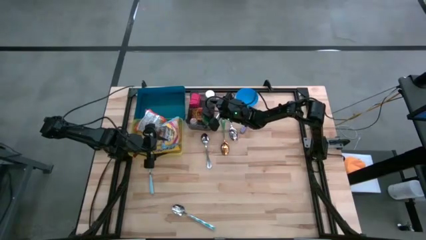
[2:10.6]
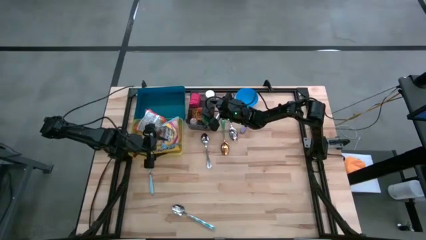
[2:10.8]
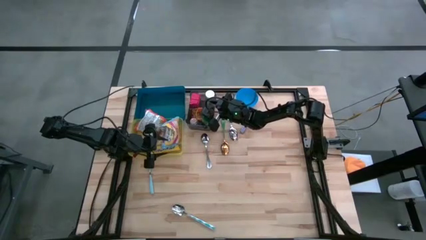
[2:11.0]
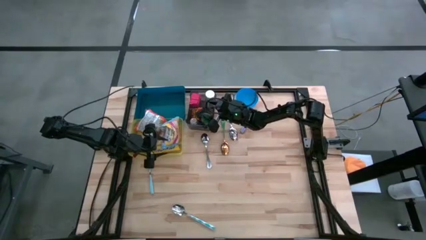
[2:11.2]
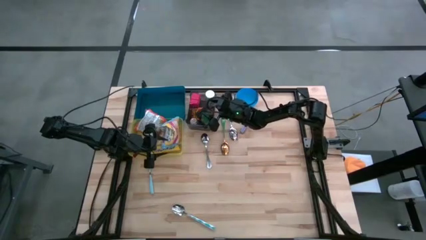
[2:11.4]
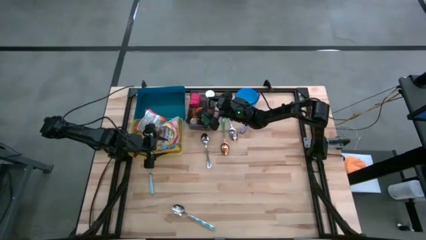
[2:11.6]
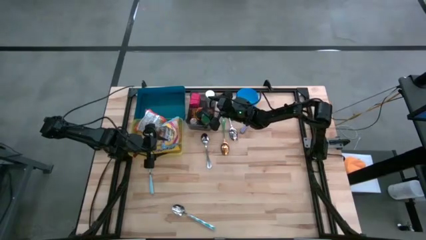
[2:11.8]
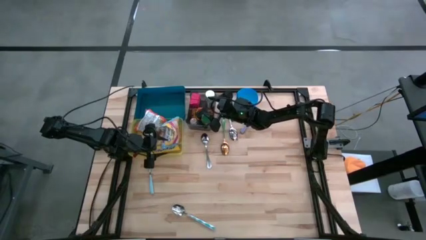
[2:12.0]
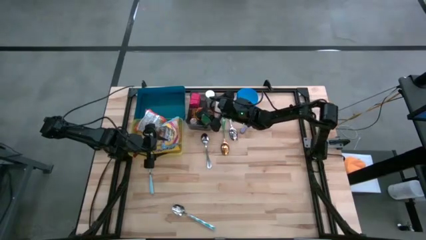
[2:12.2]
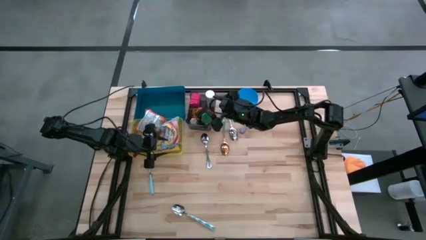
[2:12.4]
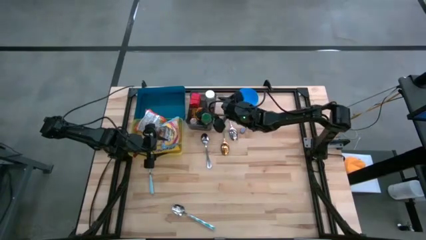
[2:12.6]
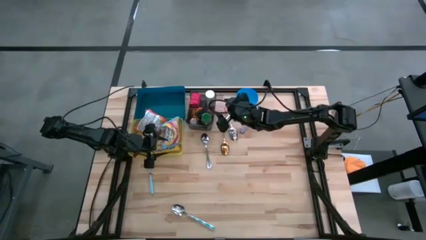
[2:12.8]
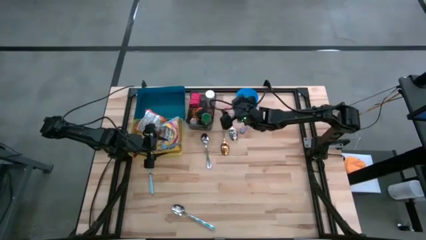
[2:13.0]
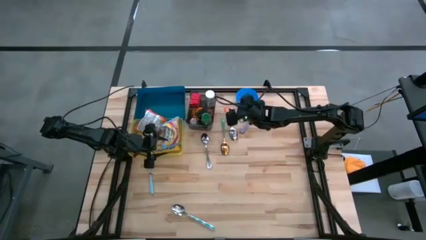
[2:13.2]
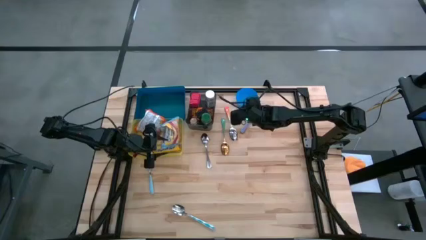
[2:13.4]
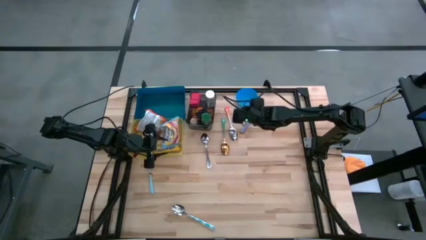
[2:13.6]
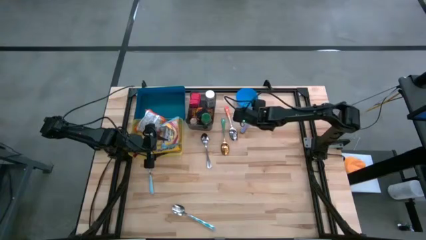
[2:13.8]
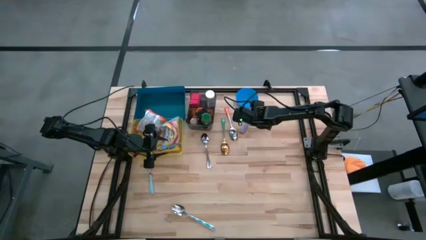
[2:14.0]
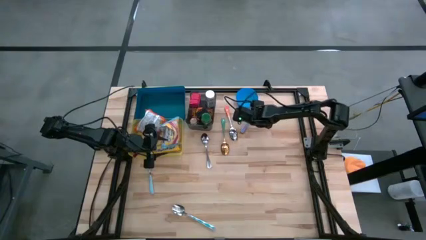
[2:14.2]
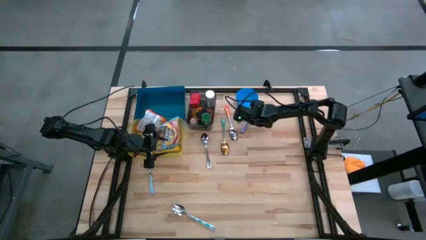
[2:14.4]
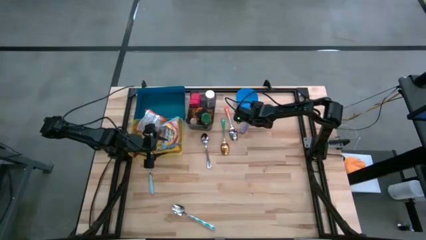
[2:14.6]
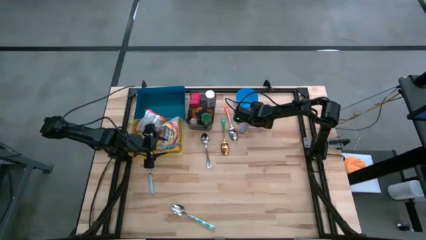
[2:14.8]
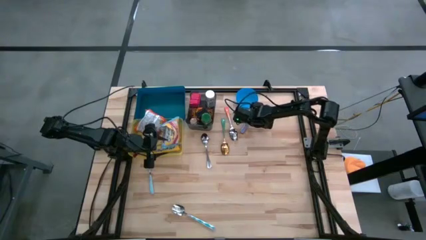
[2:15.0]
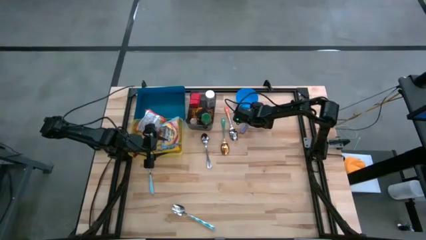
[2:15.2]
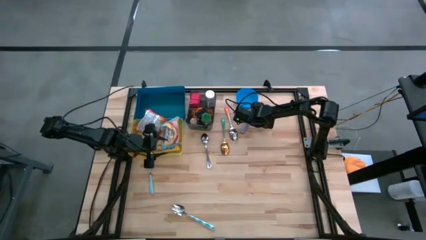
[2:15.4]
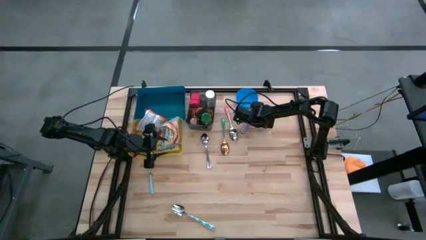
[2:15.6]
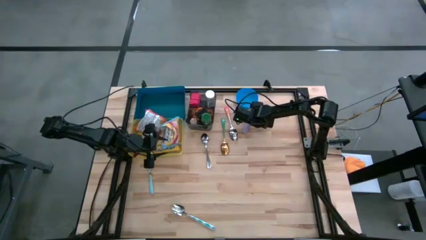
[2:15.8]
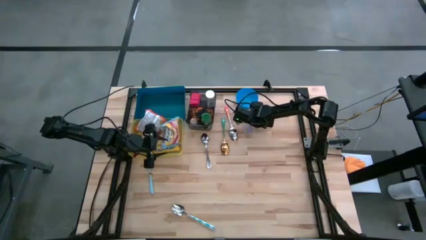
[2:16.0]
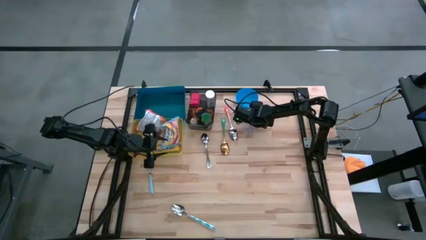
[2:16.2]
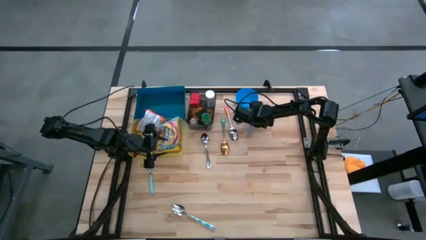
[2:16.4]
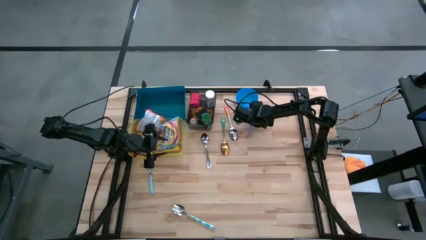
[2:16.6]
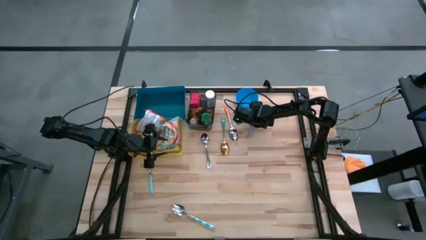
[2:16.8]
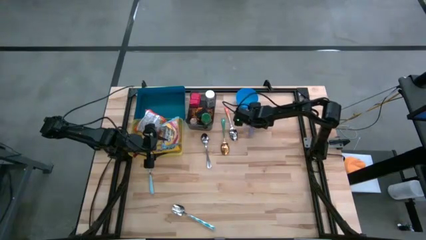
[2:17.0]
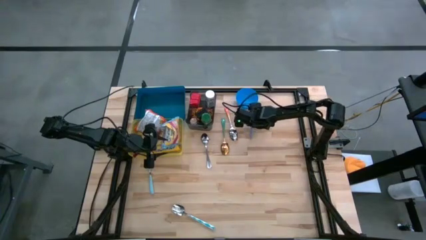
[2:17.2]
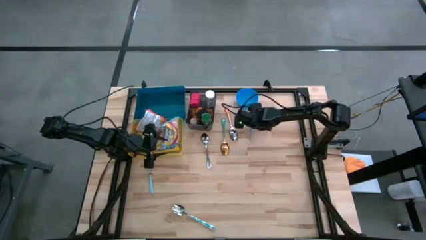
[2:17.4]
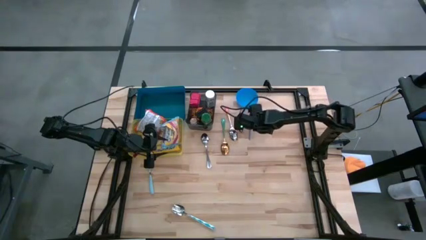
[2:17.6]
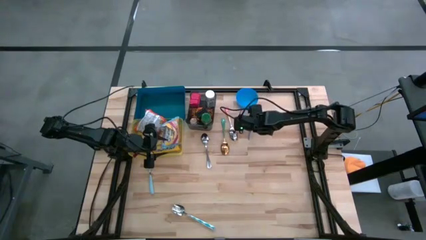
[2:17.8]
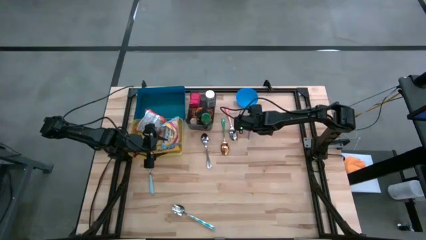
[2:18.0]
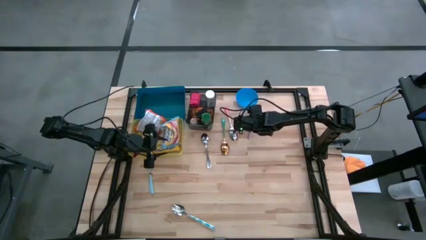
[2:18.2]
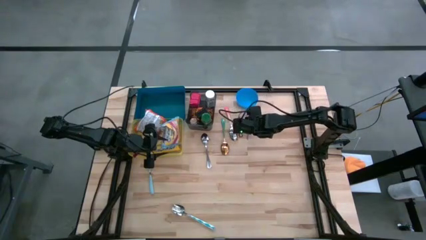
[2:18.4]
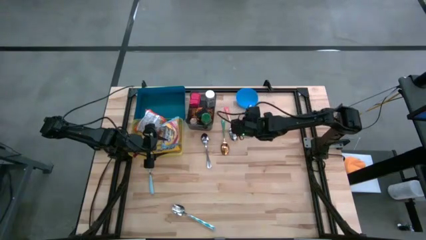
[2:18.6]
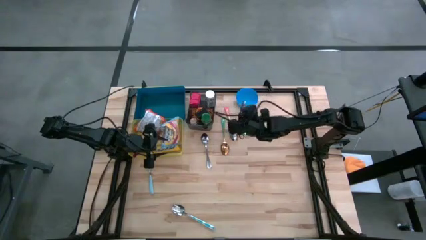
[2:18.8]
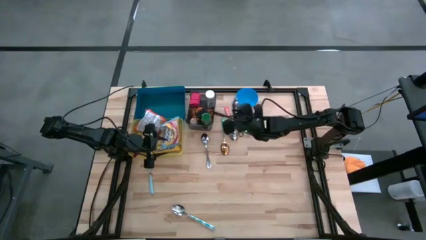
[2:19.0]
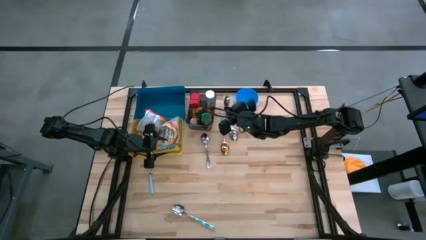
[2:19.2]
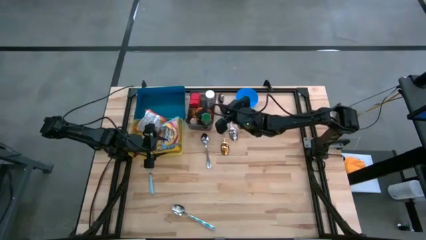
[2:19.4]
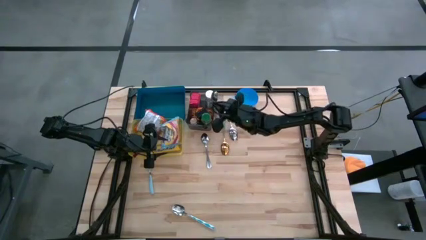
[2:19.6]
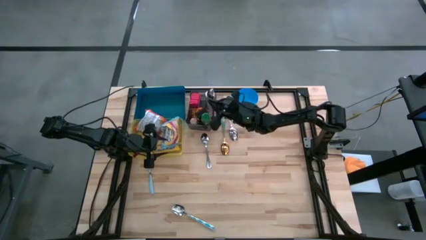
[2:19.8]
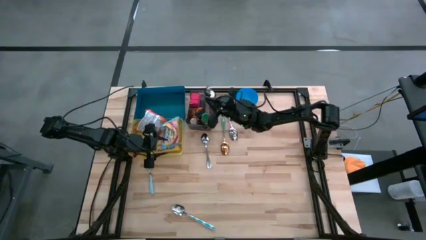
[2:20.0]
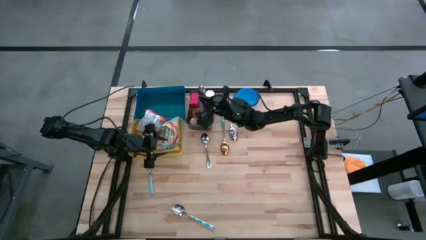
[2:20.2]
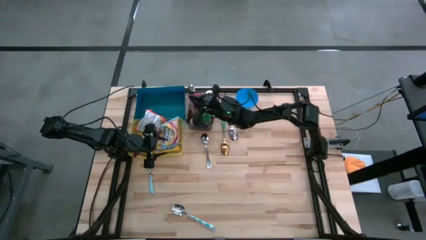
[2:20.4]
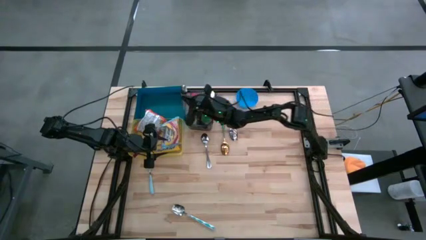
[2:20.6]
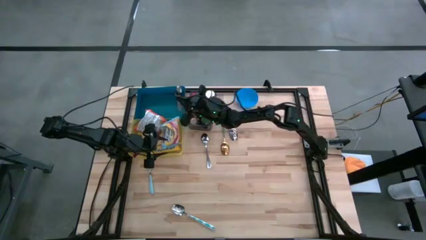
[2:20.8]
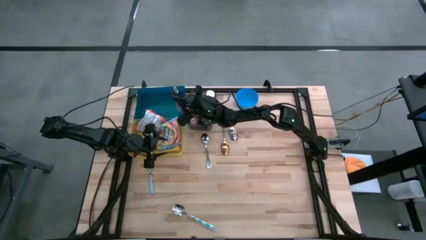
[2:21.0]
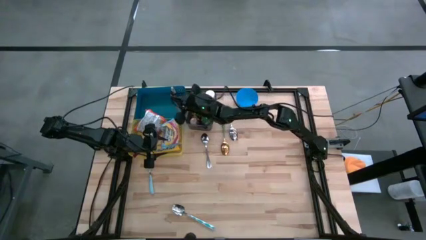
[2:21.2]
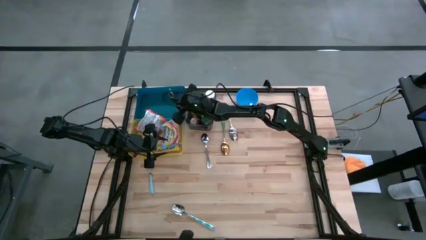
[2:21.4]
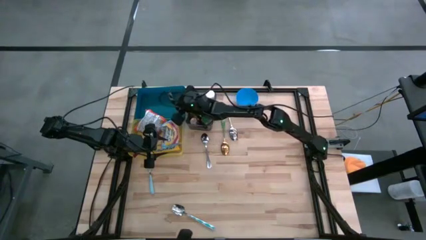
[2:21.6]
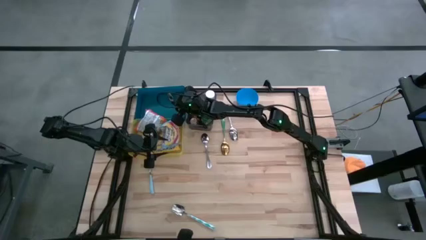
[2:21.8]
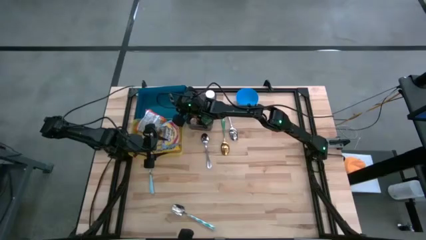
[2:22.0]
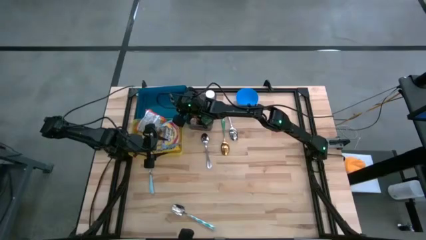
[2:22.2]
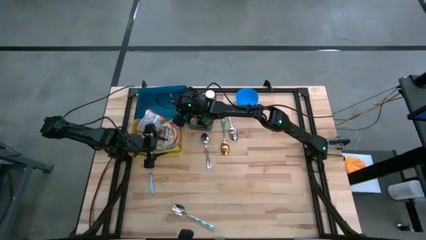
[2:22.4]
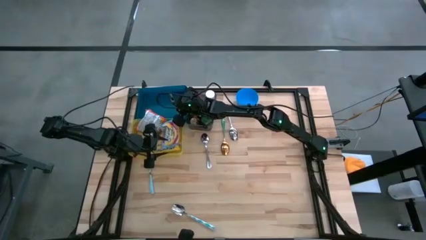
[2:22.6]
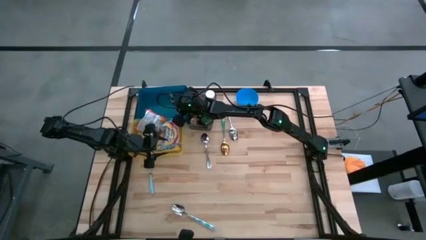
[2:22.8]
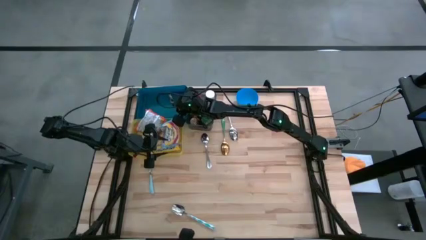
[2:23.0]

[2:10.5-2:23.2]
Put the purple spoon into the blue bin
